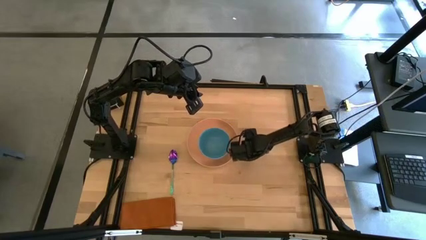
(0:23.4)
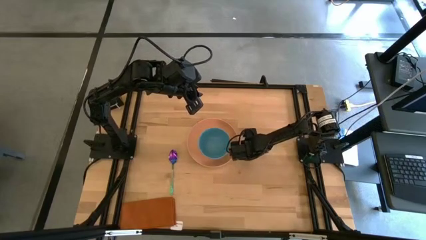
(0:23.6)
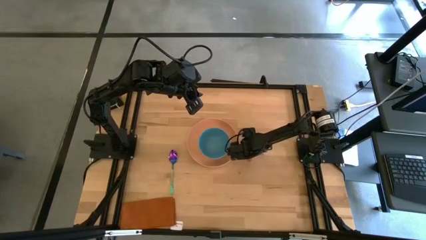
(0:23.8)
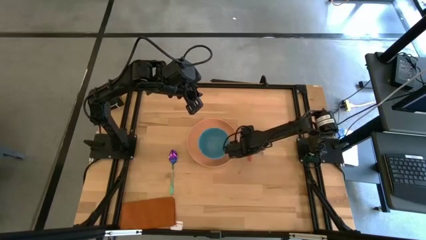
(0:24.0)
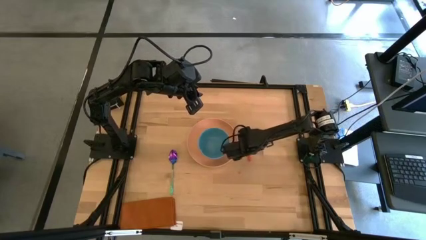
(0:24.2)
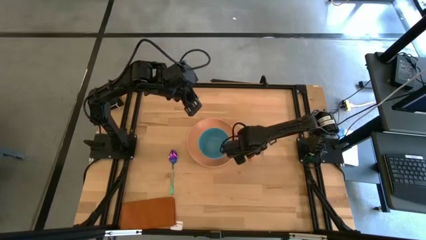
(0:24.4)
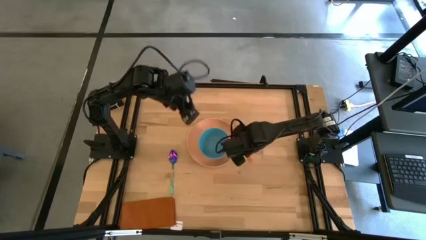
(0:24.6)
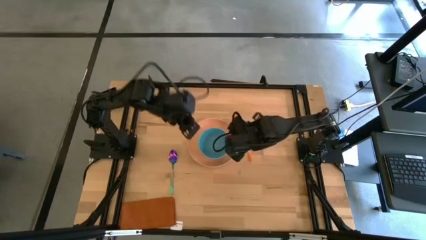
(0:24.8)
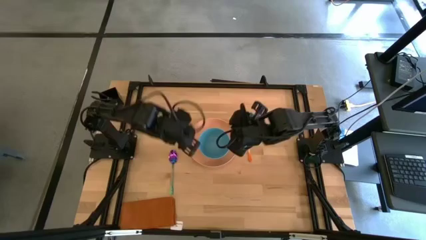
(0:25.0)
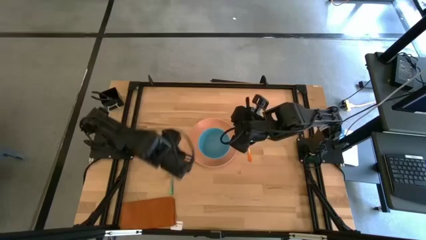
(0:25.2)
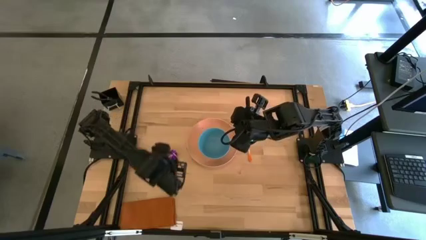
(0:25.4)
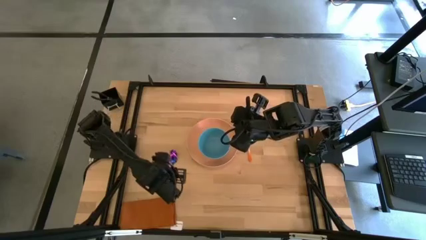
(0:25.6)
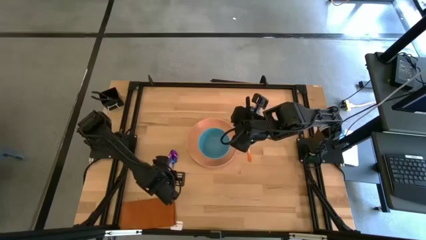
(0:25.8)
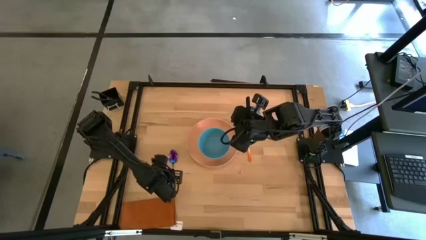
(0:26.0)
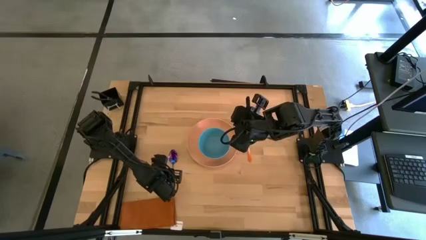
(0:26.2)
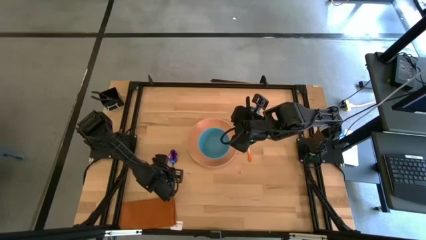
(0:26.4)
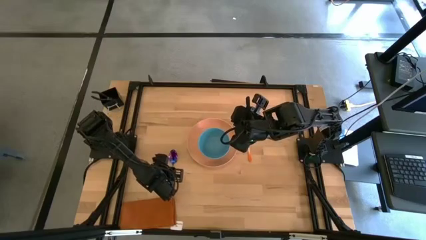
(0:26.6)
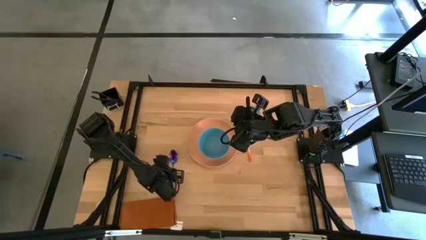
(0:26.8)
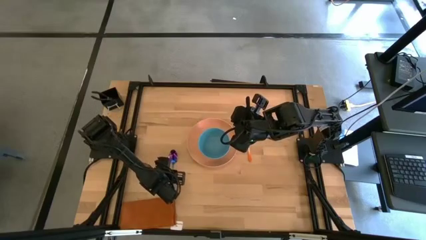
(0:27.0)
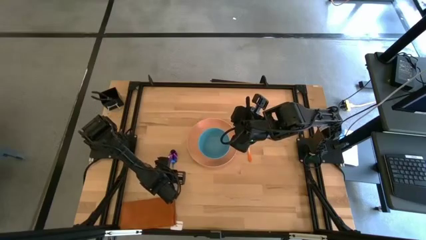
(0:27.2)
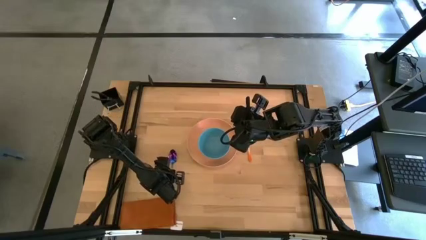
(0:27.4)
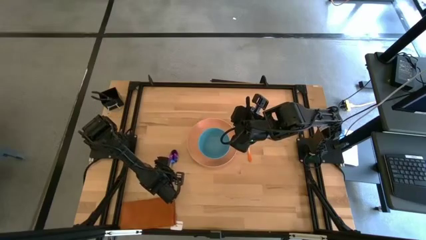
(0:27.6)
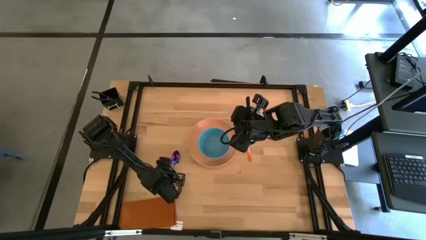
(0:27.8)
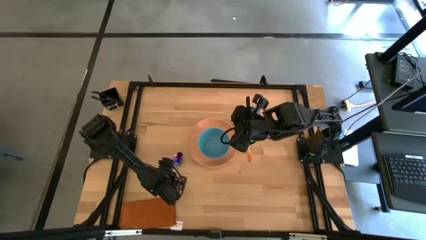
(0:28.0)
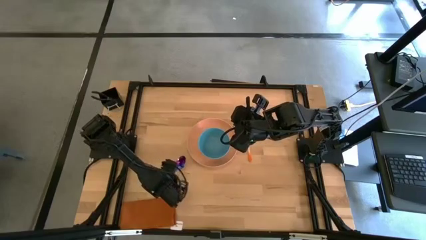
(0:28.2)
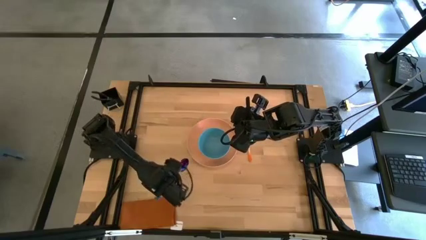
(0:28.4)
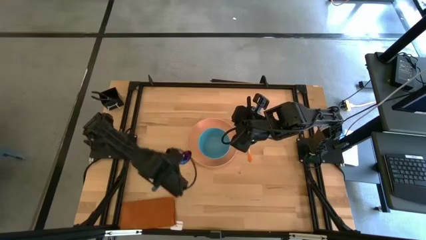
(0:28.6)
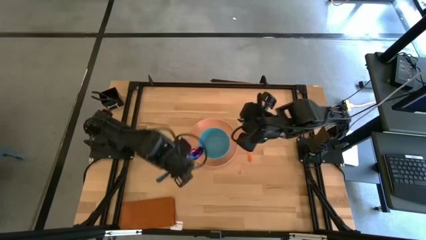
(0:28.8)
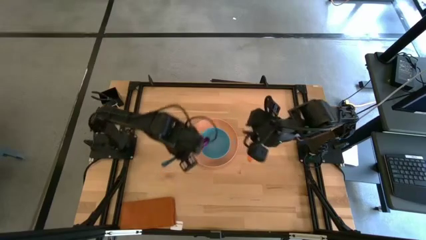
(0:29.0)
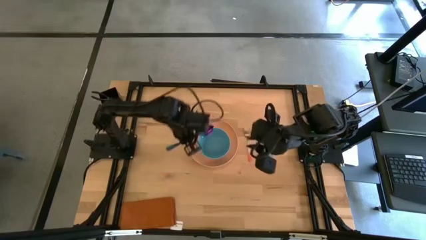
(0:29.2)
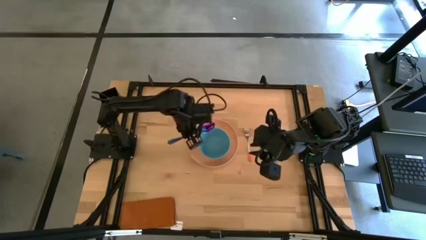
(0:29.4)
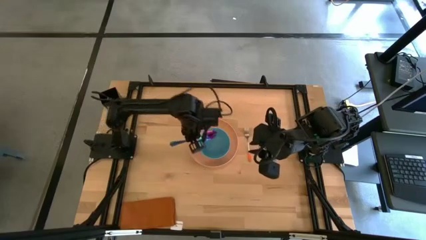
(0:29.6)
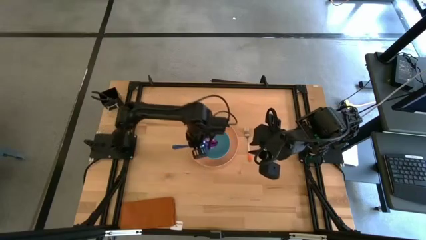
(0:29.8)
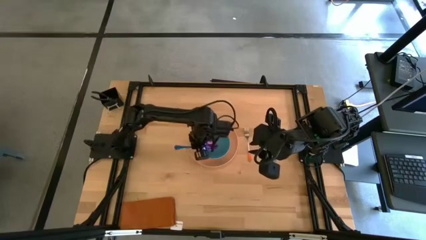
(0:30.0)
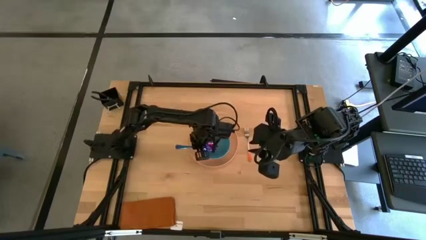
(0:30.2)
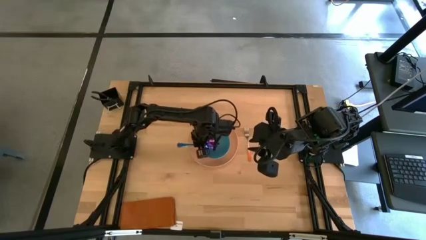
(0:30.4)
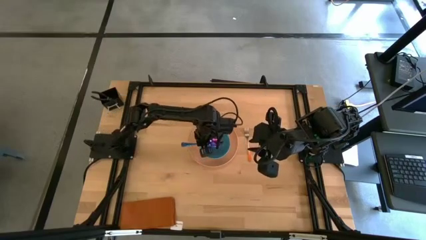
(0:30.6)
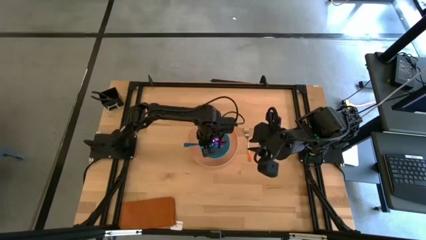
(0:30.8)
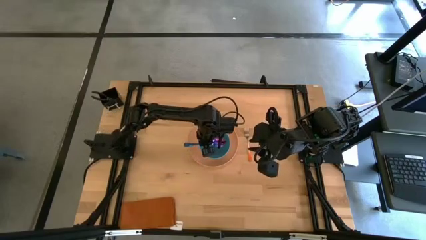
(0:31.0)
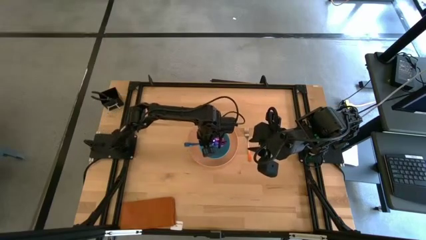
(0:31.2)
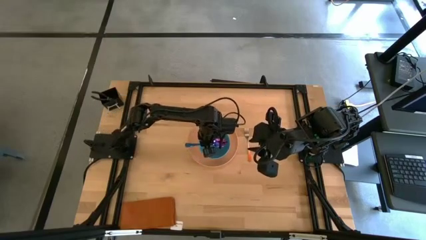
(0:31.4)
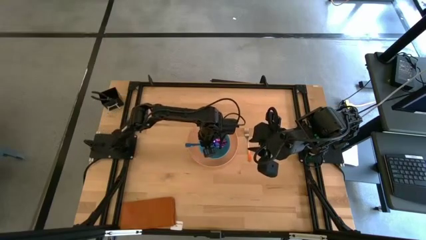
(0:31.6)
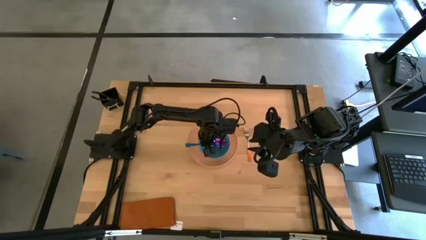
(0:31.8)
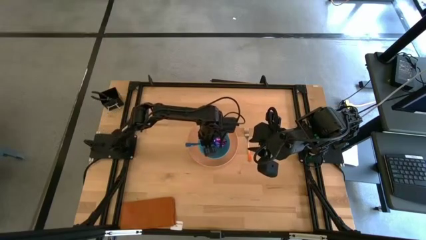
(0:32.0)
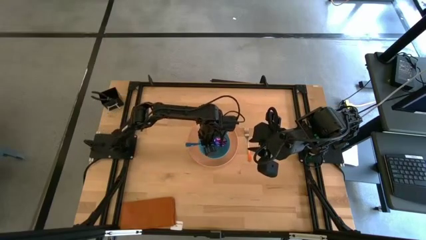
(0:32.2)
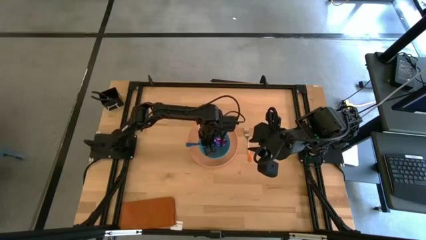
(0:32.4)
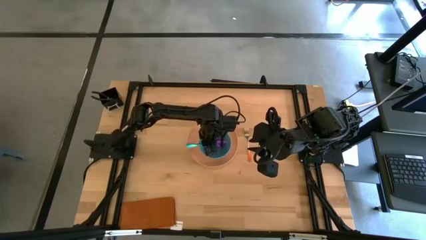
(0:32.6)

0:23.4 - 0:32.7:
Task: Set table place
Put the purple spoon into the blue bowl

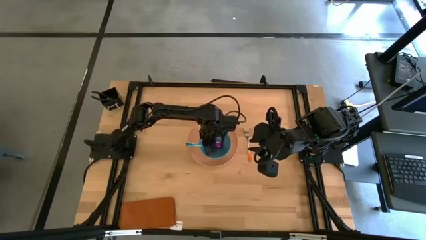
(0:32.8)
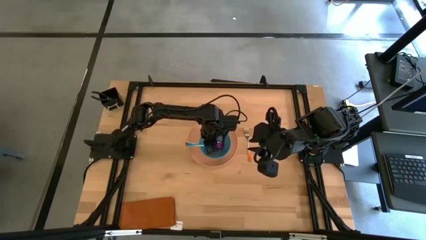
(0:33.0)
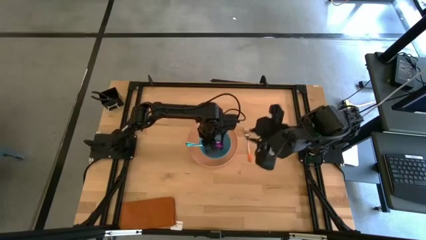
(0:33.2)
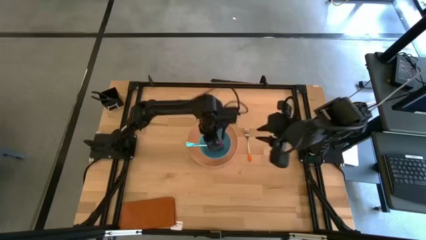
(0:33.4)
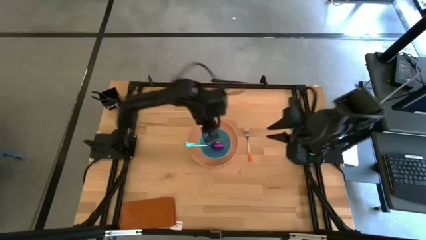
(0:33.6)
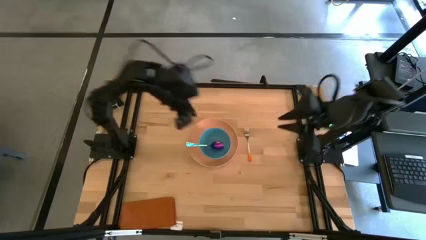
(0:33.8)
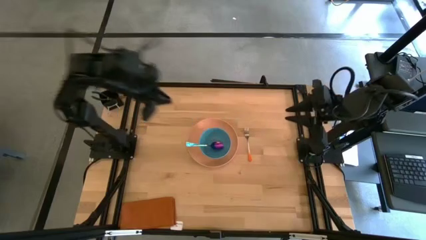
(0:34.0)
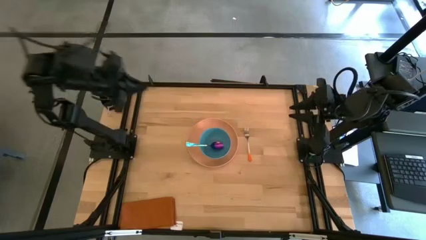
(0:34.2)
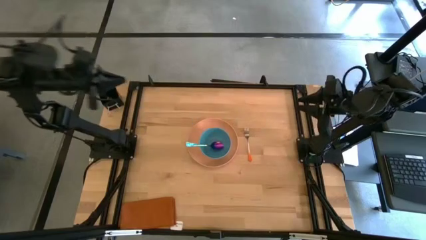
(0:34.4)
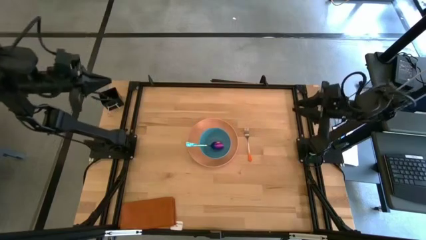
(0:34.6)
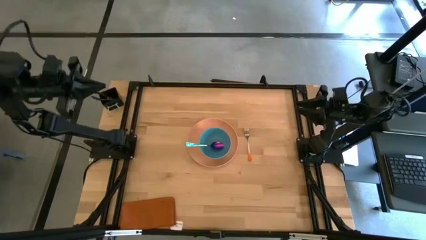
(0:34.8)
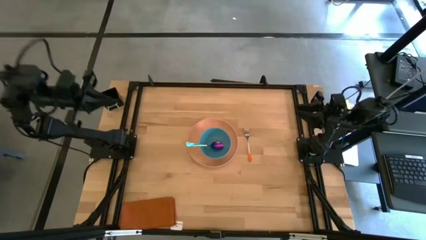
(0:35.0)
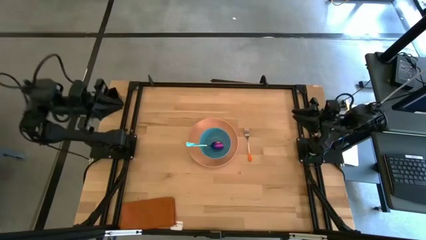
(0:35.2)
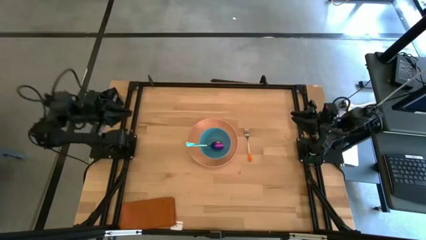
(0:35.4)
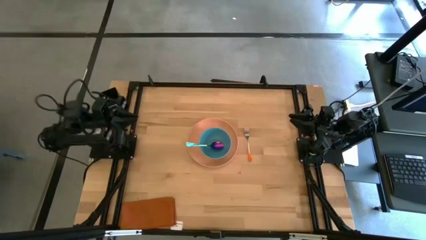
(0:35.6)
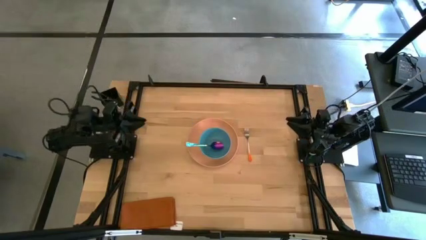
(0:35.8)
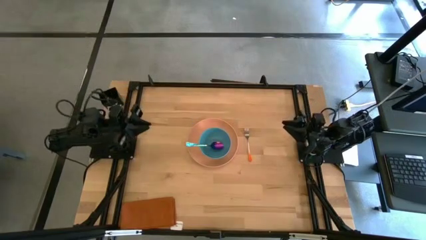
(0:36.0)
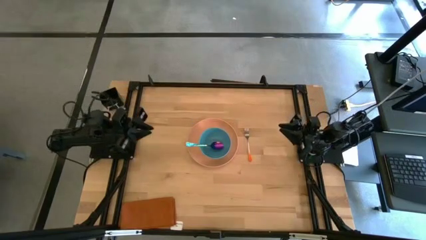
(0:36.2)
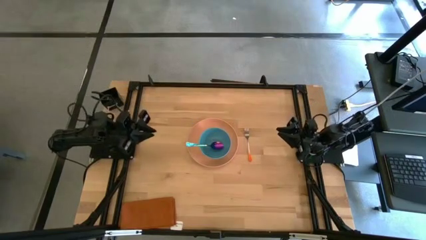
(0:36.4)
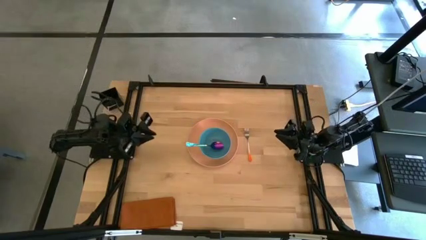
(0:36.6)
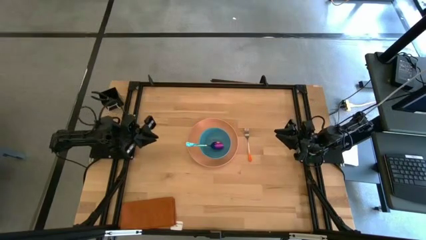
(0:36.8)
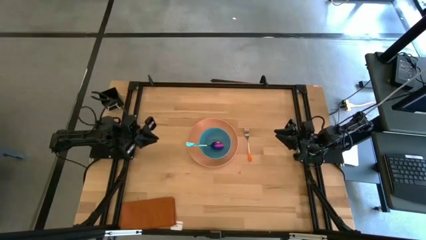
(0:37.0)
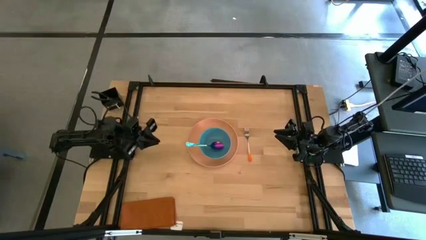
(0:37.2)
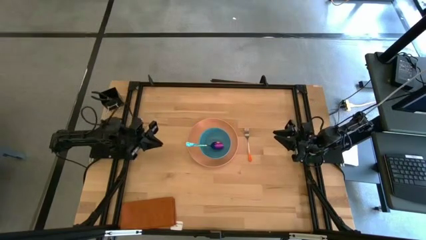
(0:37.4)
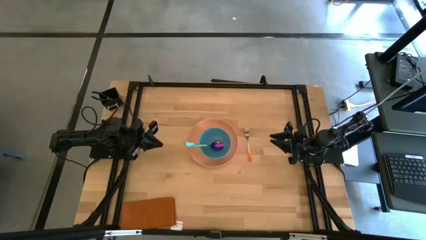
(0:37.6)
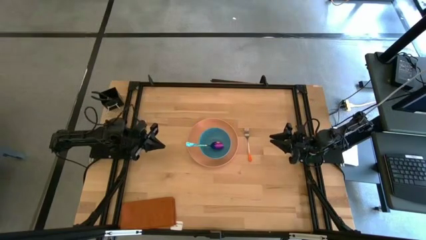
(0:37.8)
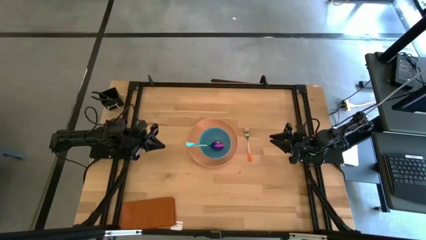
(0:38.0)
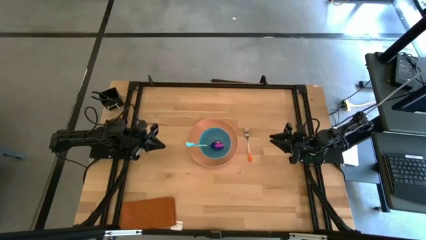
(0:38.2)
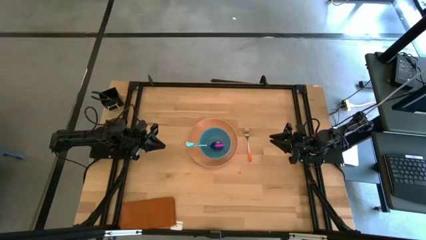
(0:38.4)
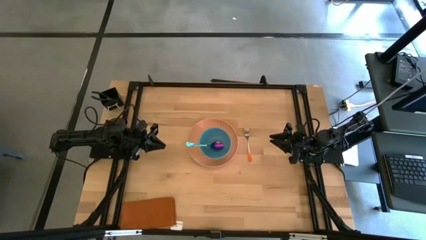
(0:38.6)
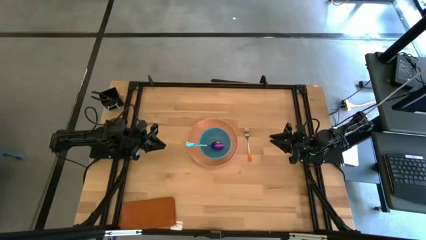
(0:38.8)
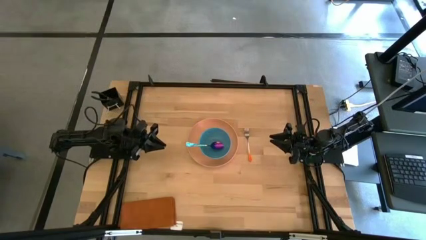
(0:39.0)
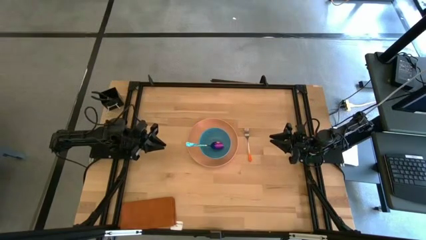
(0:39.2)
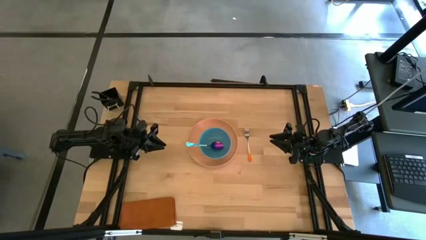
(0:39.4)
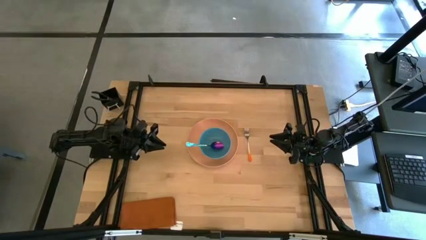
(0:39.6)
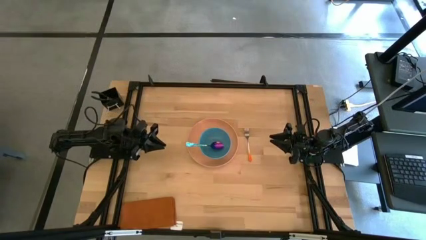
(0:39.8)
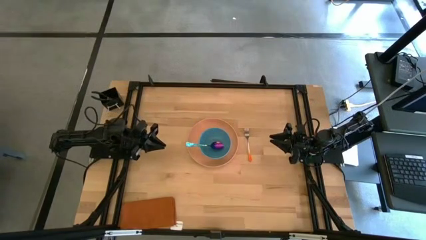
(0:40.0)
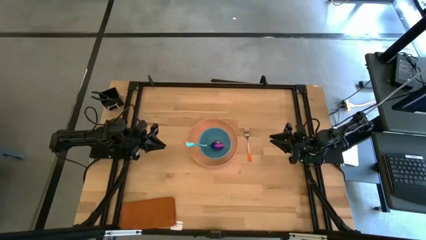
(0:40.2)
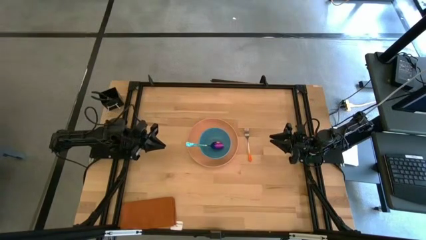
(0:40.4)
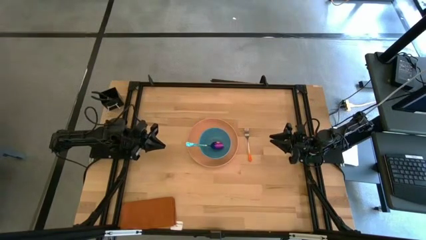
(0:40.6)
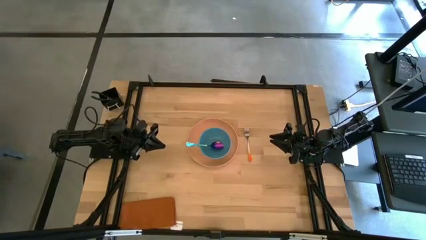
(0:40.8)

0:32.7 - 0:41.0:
Return to Home Position
